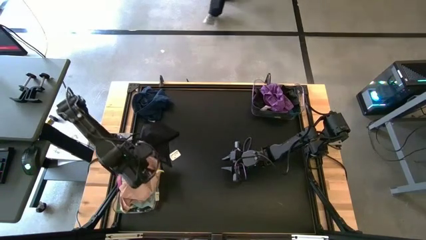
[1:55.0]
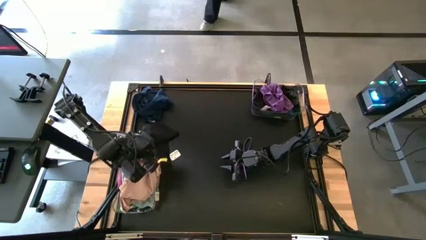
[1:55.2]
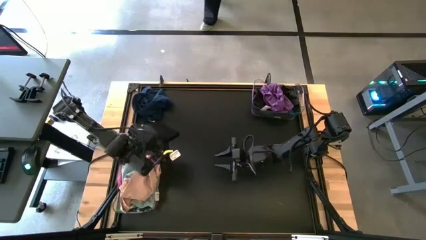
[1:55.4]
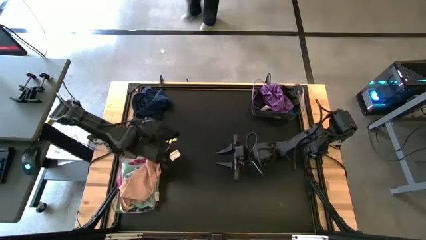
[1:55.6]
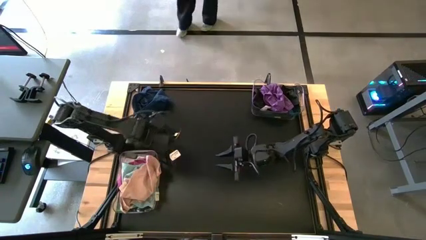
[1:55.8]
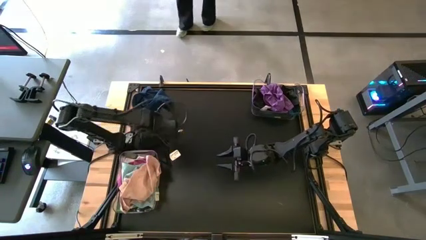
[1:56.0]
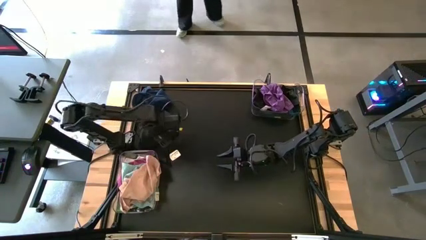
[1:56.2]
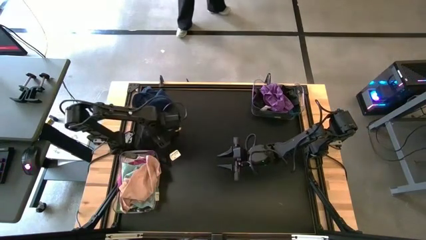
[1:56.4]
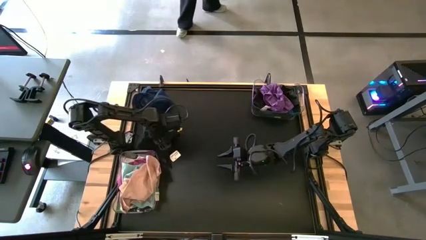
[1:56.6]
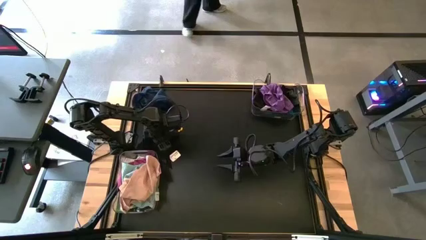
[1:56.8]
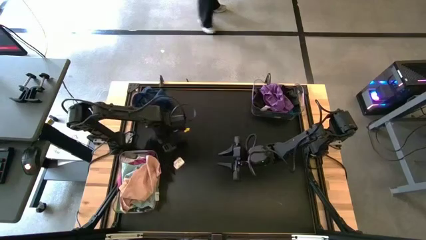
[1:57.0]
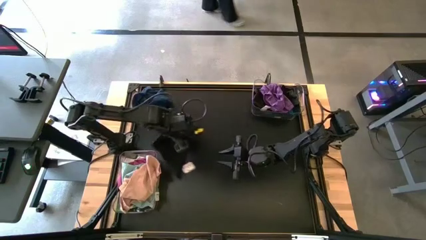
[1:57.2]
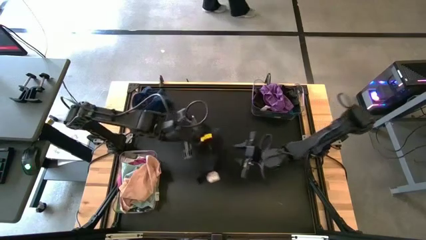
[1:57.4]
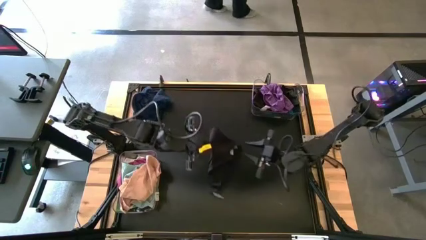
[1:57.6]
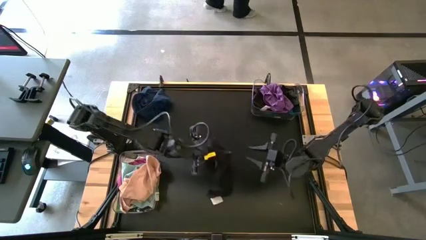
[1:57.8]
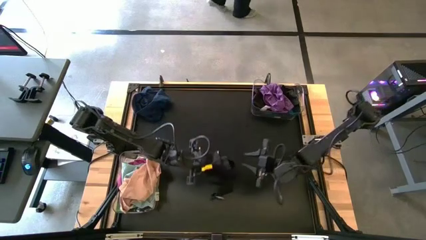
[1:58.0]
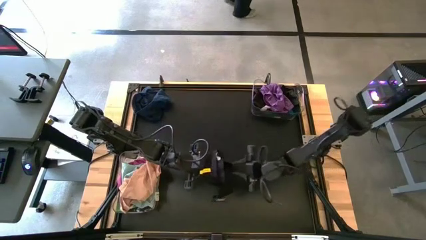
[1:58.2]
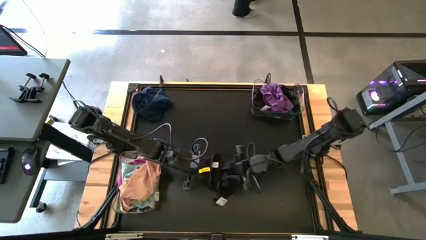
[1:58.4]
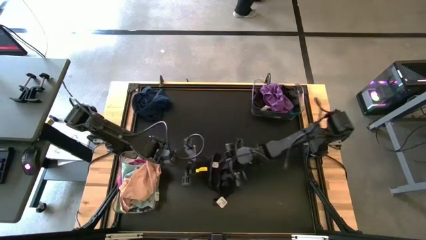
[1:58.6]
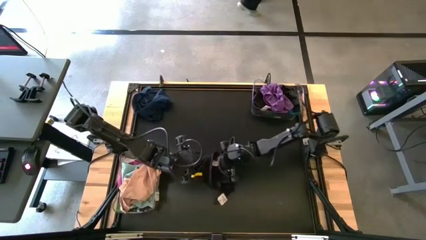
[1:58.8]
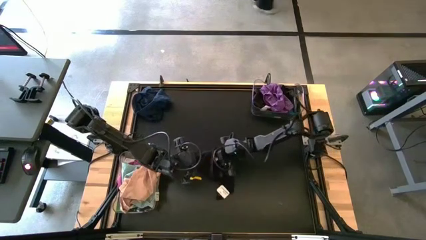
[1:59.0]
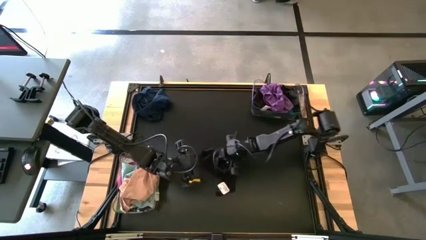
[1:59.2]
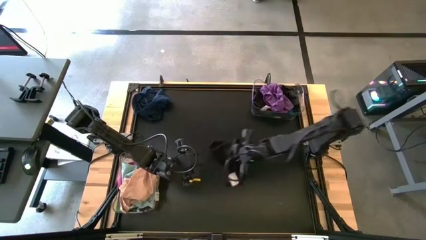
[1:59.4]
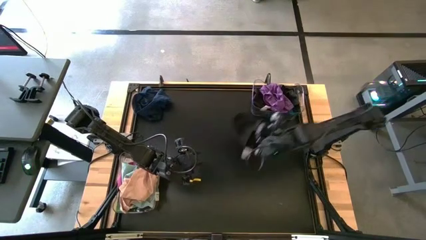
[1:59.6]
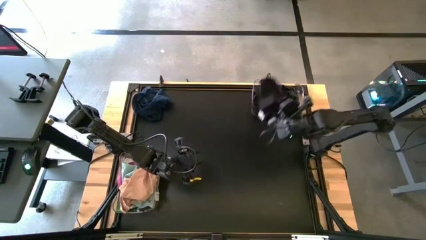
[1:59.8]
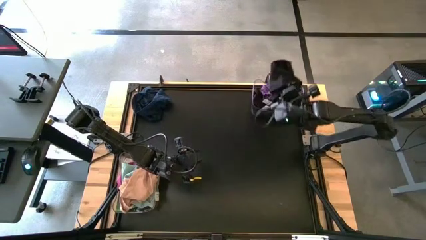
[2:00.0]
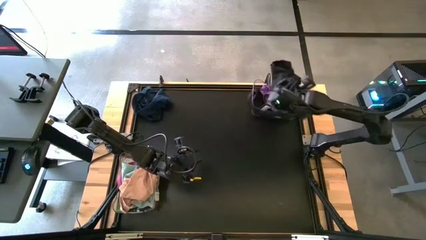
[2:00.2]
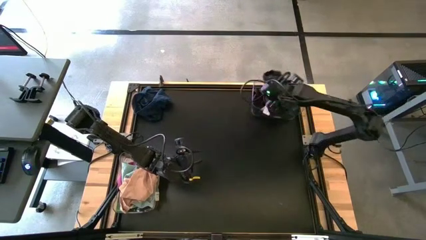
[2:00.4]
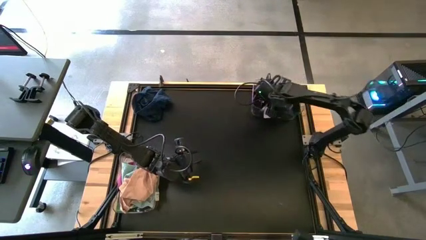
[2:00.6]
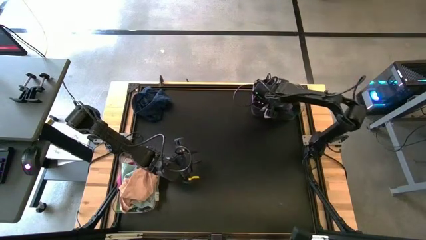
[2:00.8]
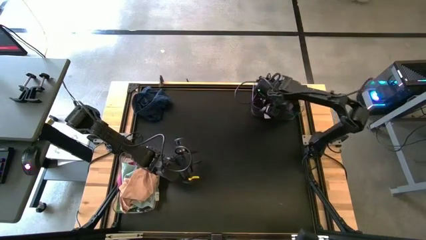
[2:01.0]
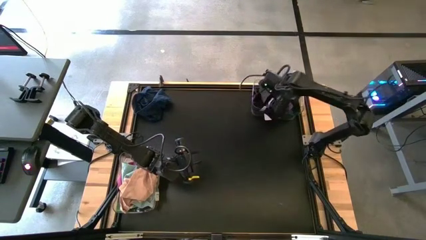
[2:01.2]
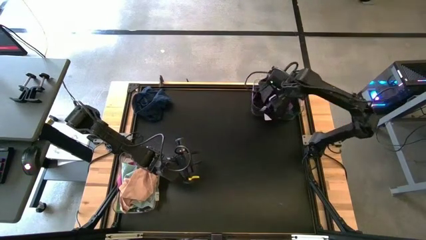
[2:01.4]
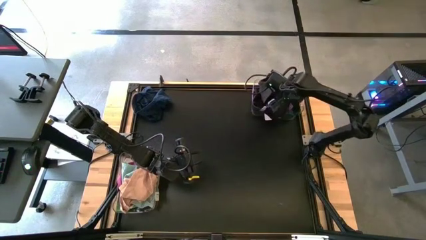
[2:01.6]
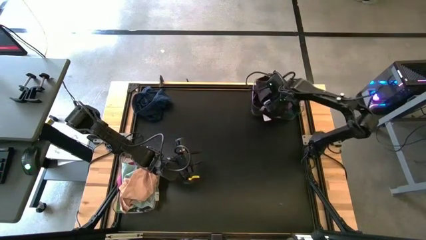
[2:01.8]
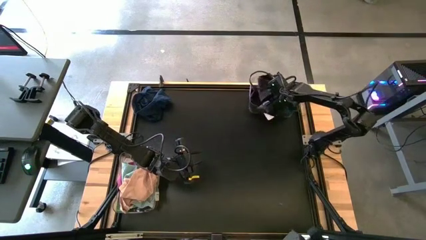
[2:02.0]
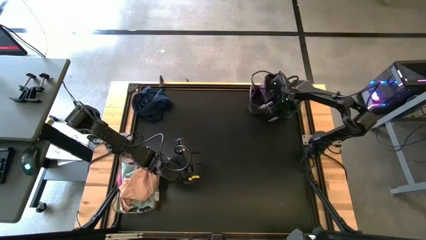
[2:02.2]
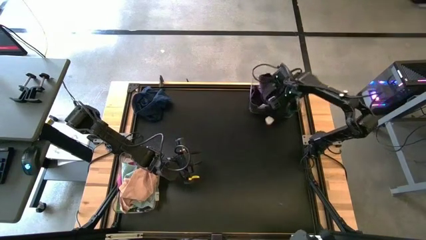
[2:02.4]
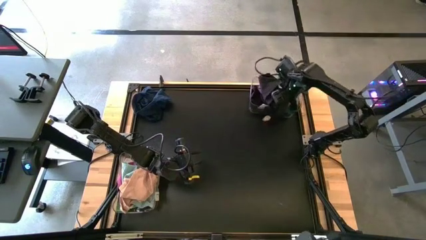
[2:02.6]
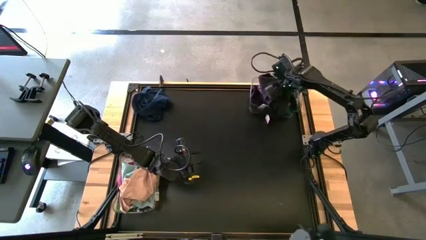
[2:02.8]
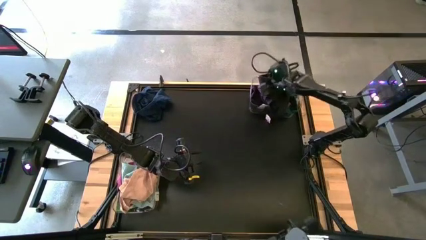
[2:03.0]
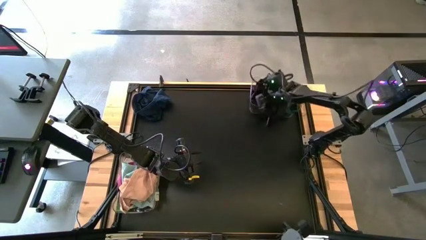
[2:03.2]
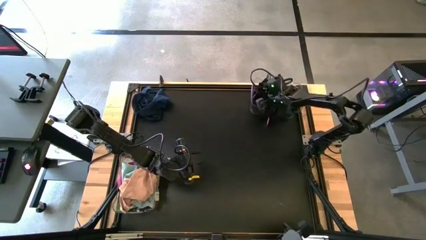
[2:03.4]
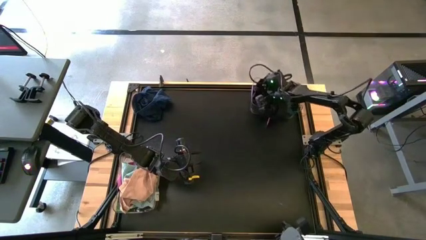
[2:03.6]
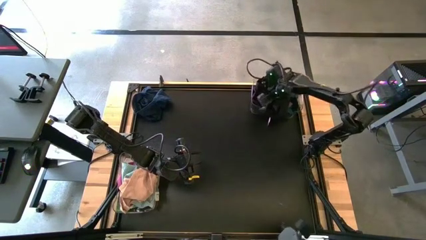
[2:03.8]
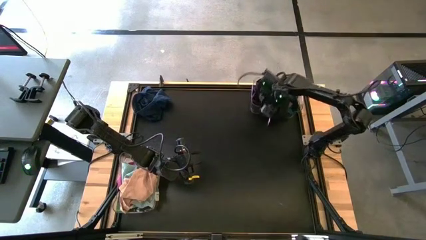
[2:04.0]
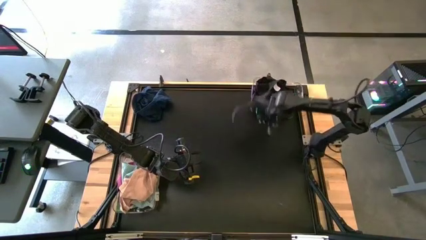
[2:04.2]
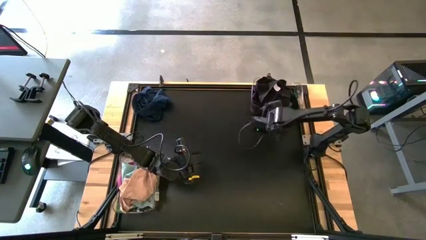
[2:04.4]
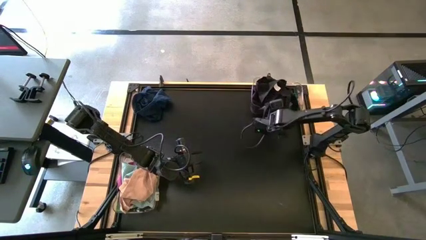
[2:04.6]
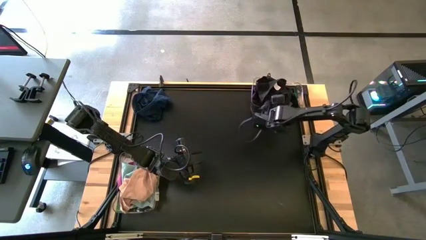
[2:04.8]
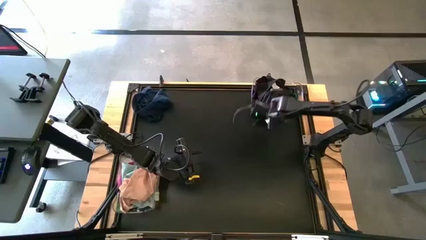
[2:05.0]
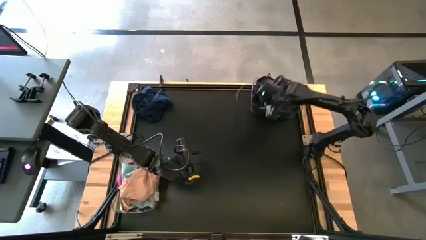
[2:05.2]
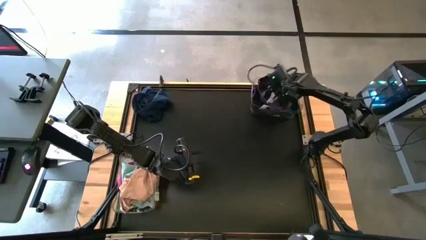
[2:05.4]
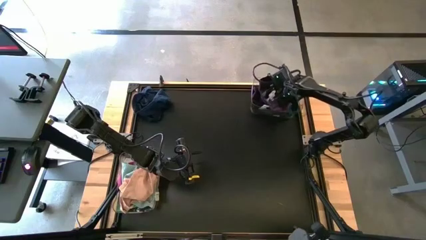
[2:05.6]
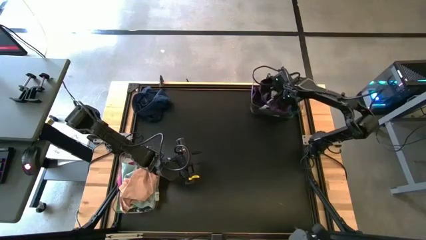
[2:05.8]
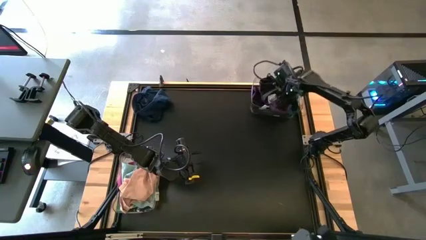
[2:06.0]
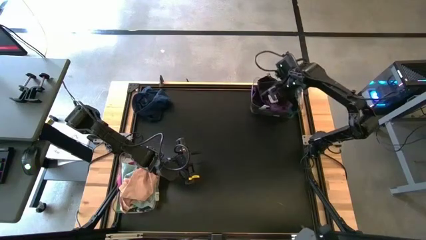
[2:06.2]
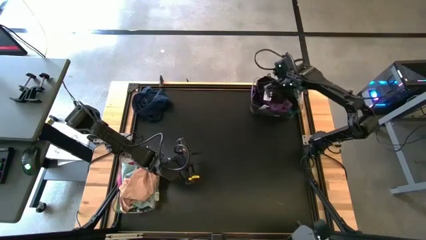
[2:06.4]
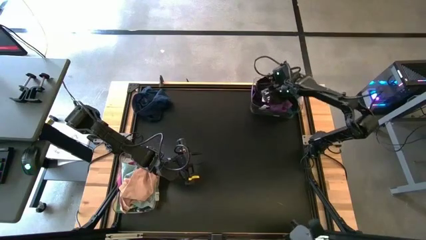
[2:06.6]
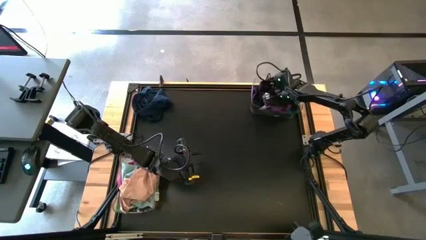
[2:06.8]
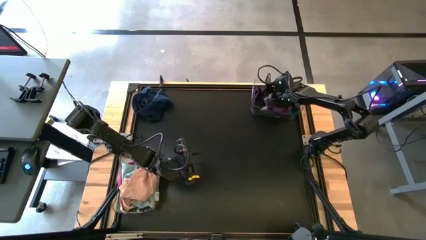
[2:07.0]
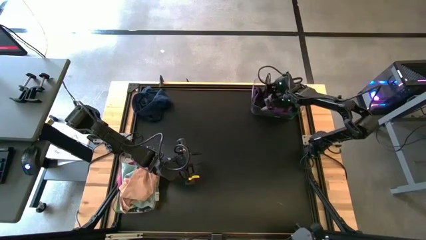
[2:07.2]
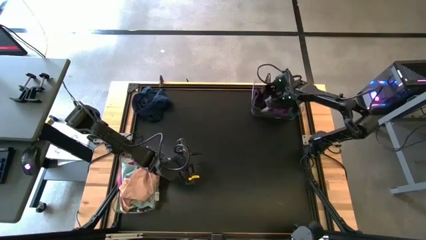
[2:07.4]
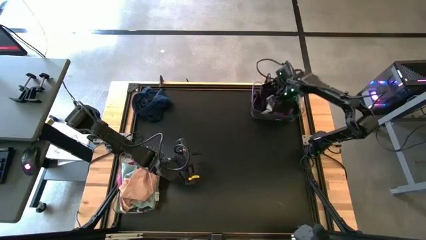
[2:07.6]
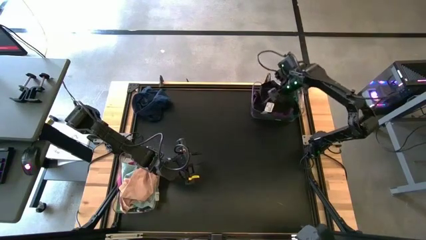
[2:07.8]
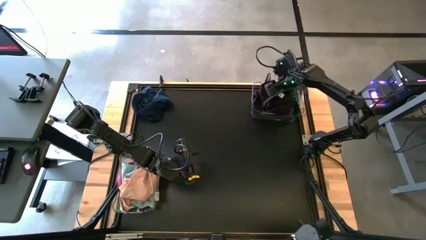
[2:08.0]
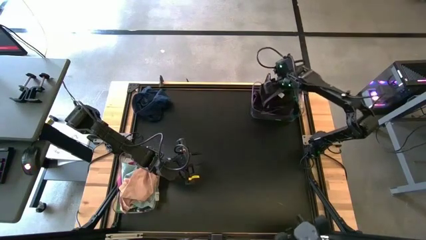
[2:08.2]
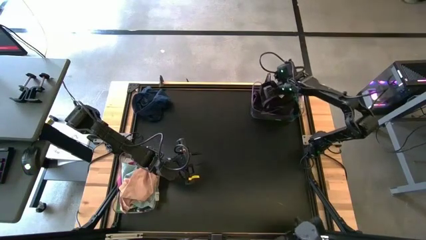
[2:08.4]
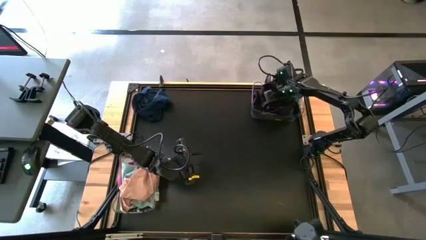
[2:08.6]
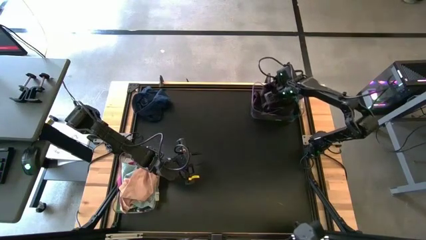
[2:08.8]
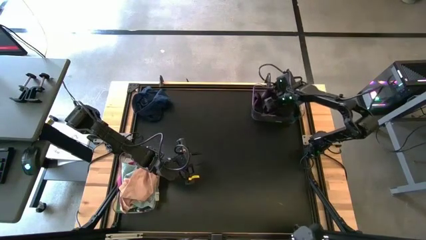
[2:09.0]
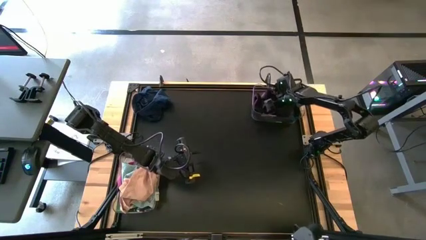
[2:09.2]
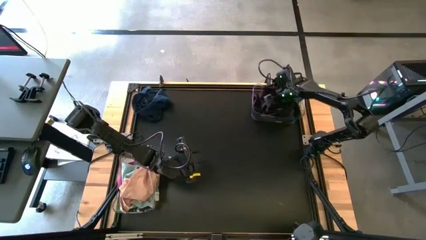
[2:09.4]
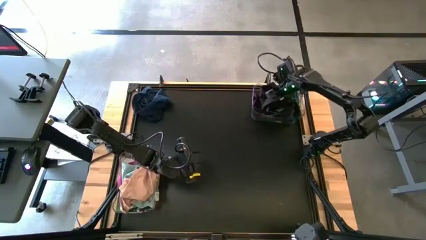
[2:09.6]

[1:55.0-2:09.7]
Task: Sort towels by color in basket
Put the black towel into the top transparent bin
